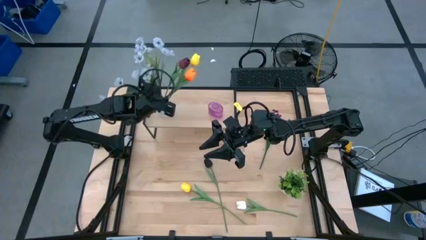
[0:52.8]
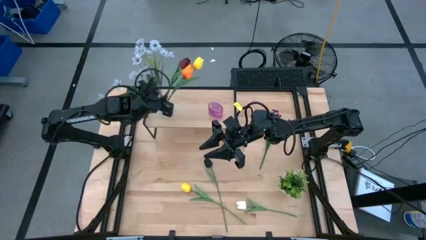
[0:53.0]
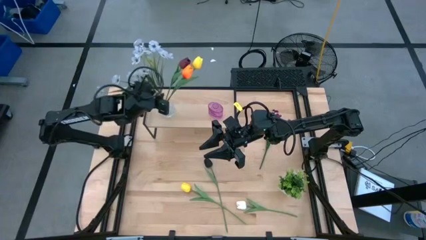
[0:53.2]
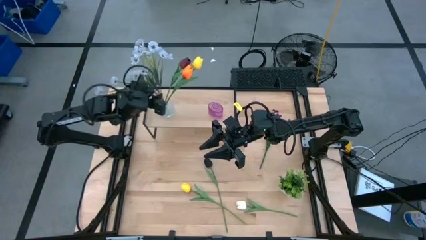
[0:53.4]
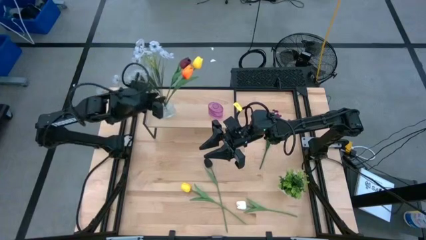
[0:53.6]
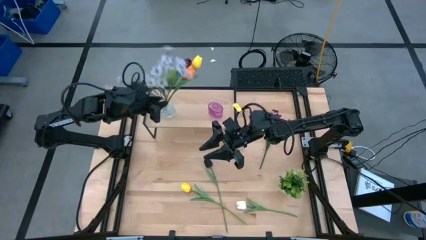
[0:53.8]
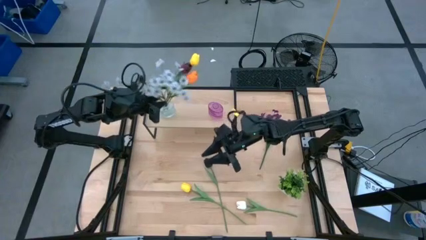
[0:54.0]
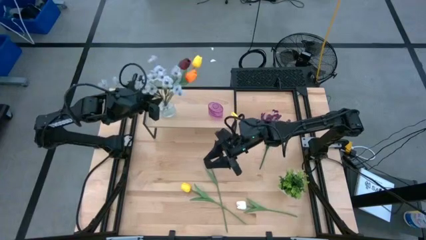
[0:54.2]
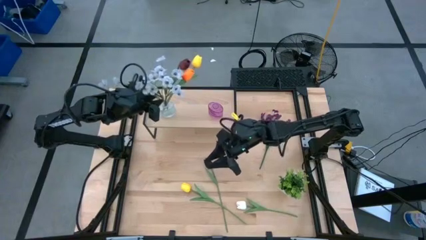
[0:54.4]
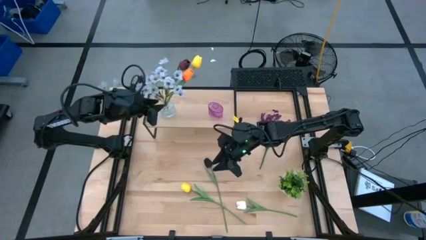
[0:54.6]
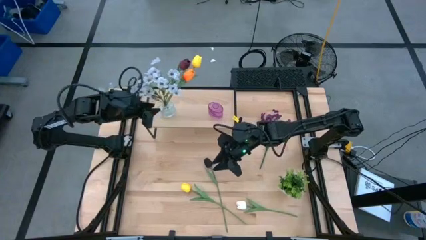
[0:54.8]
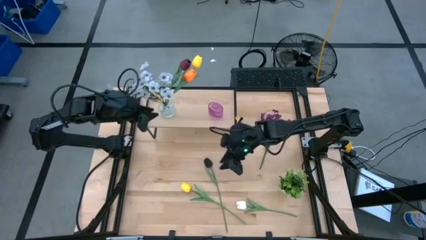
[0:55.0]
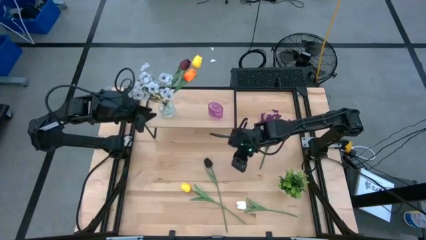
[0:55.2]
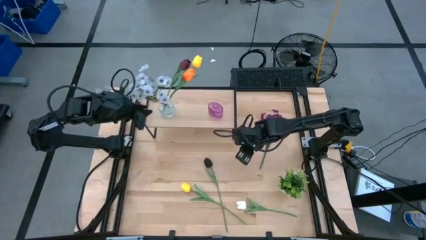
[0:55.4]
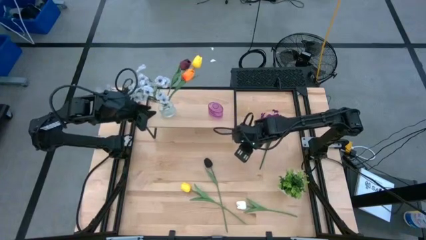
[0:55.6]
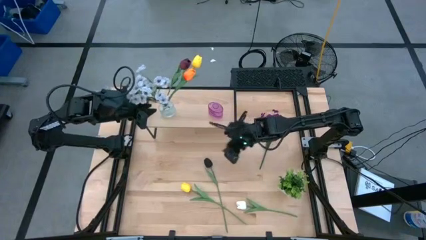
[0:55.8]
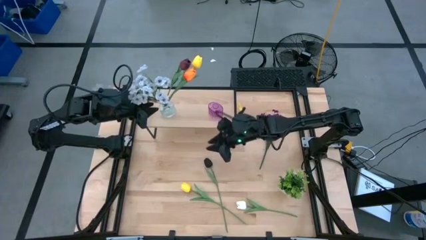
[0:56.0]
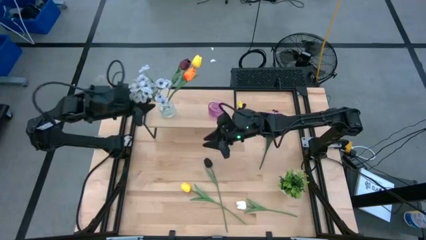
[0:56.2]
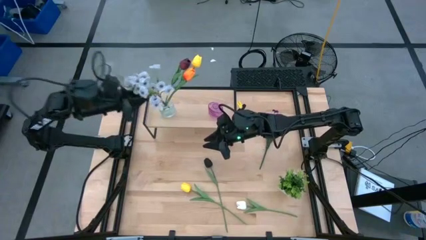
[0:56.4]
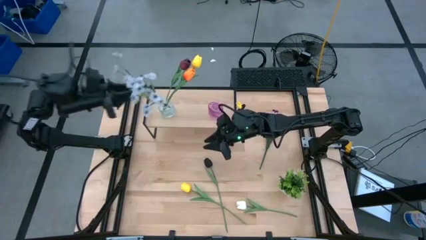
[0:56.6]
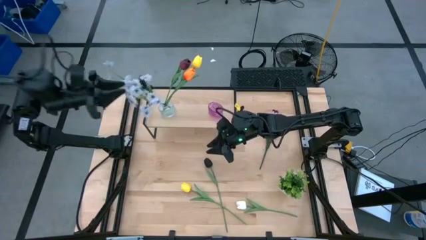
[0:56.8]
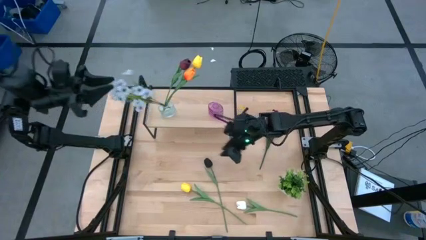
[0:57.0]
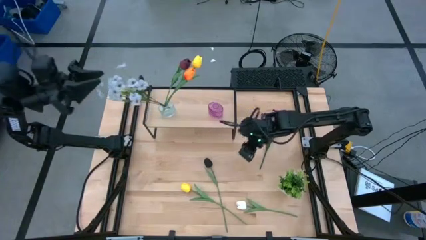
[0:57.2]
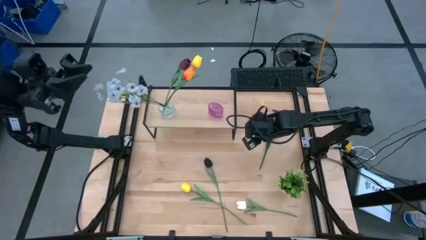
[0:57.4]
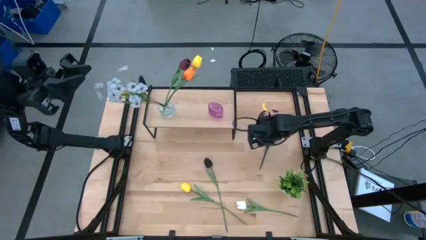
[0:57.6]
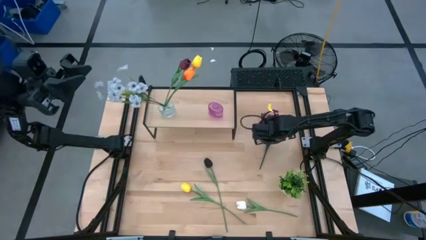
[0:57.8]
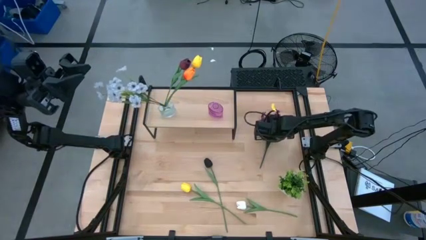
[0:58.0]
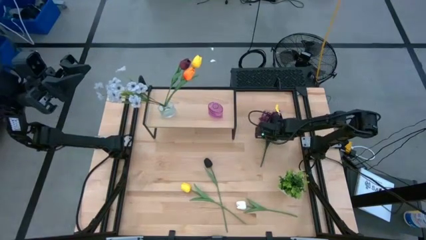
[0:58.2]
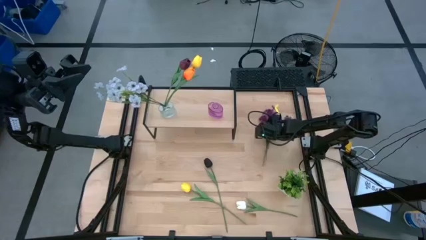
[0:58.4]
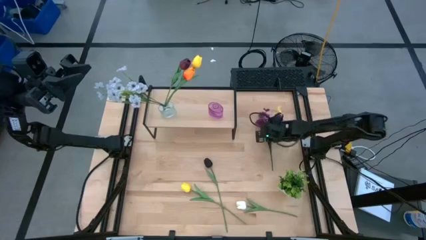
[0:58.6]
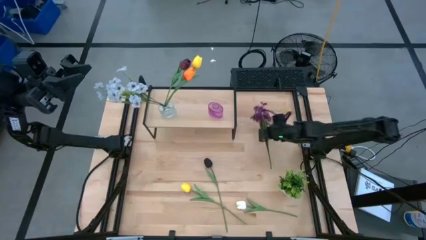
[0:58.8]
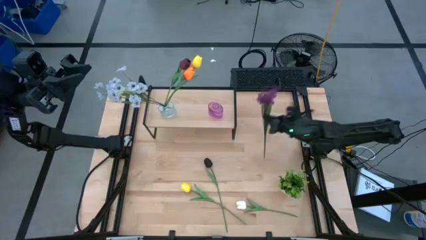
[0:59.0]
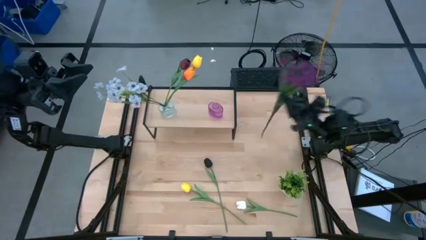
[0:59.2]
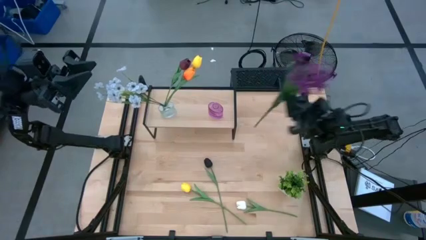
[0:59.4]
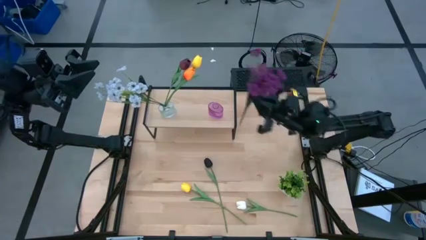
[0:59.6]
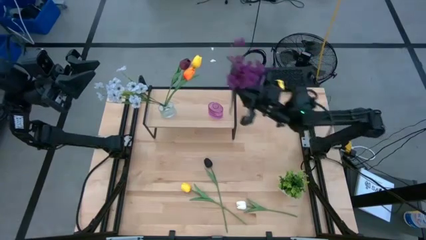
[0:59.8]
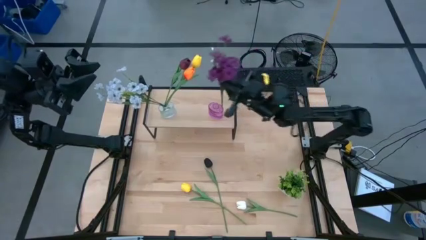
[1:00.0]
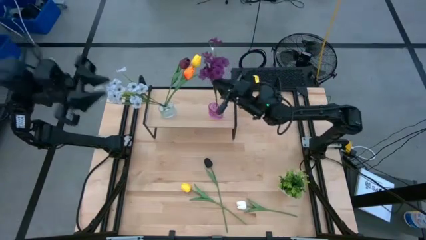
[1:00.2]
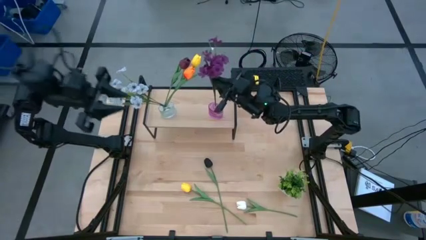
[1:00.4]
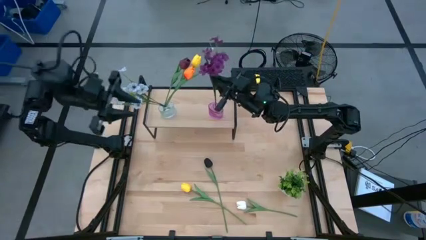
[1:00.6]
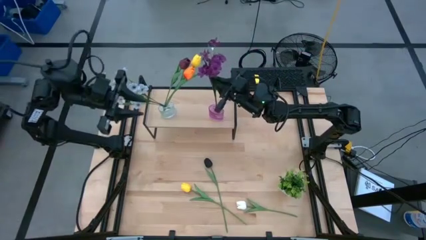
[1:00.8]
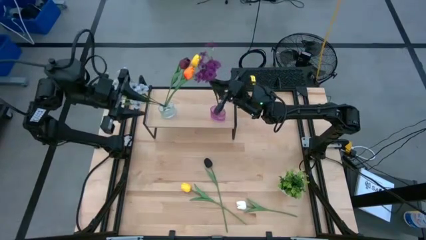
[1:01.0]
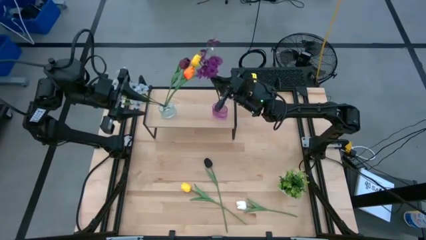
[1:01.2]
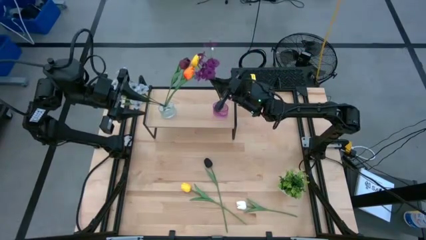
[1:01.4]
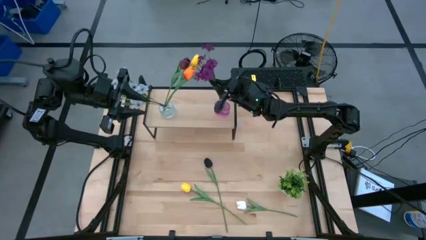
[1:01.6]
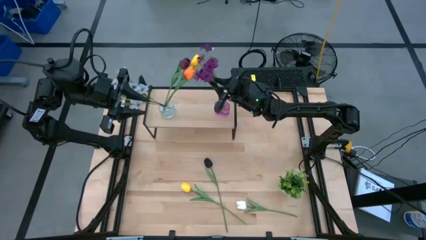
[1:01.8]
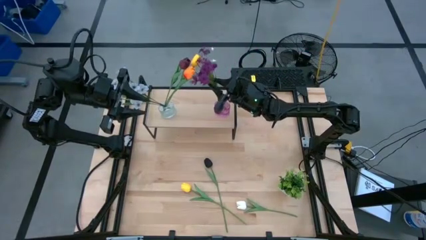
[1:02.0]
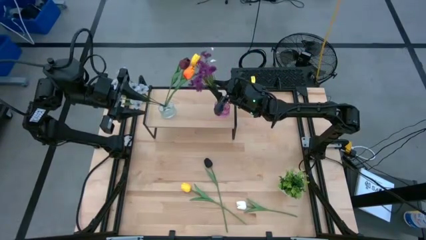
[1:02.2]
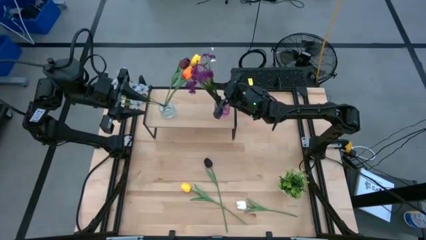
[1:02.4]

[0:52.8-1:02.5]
Task: Pick and place flowers into a vace then onto a shelf
Put the violet flowers into the violet vase on the shelf

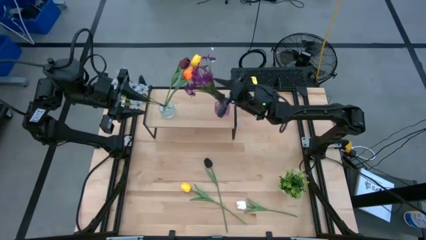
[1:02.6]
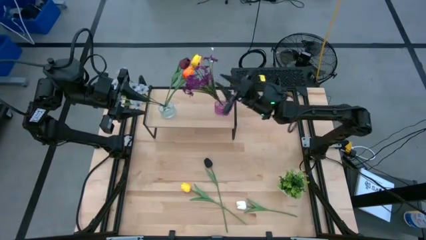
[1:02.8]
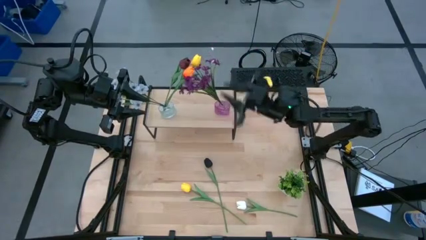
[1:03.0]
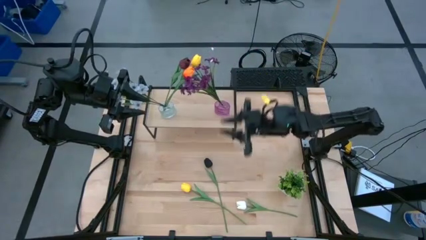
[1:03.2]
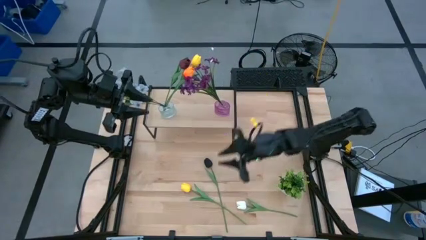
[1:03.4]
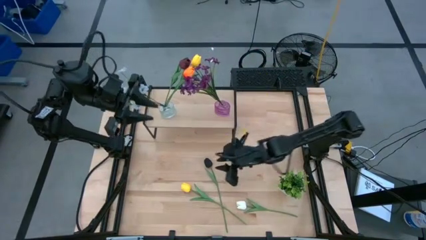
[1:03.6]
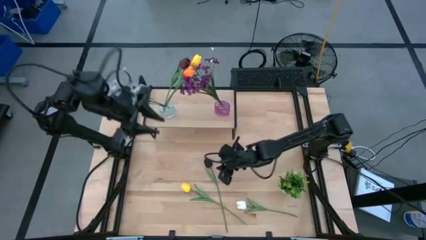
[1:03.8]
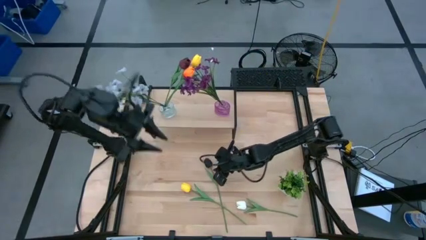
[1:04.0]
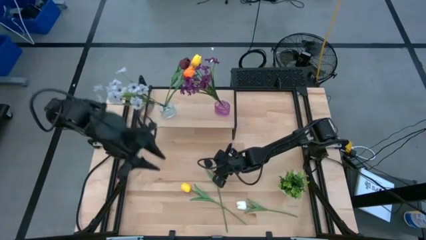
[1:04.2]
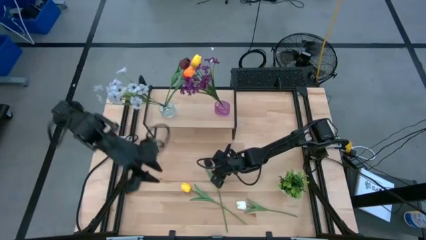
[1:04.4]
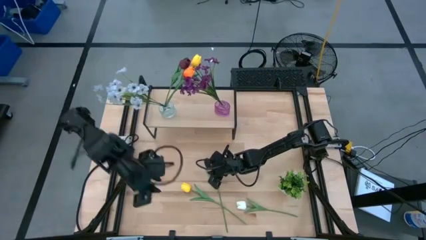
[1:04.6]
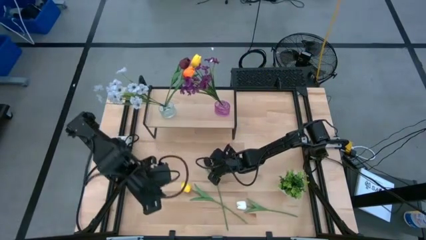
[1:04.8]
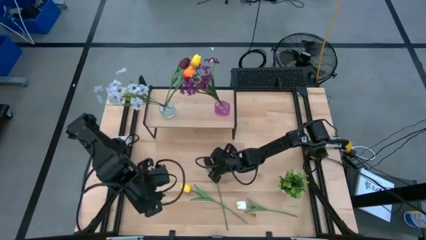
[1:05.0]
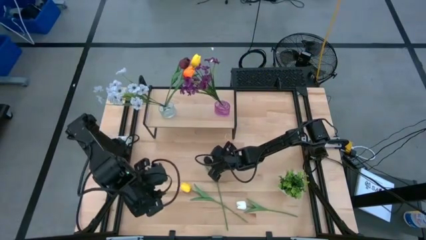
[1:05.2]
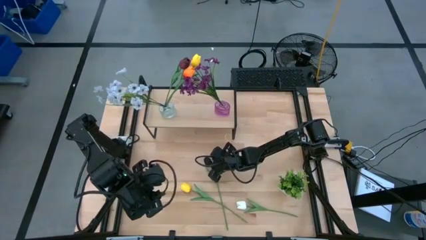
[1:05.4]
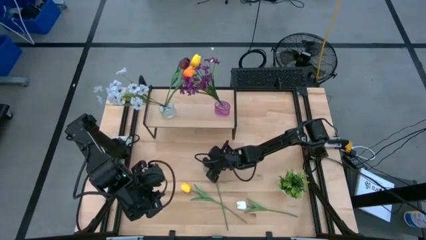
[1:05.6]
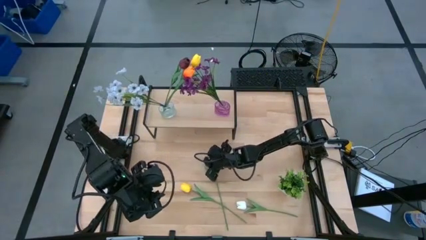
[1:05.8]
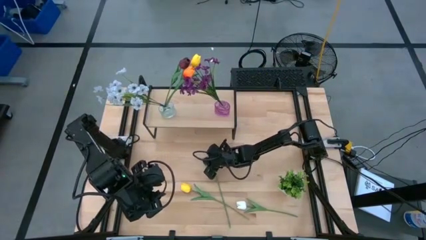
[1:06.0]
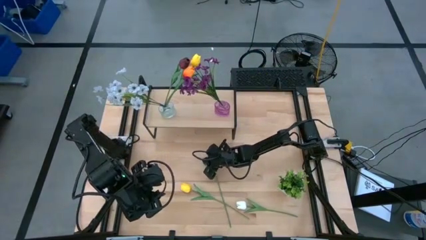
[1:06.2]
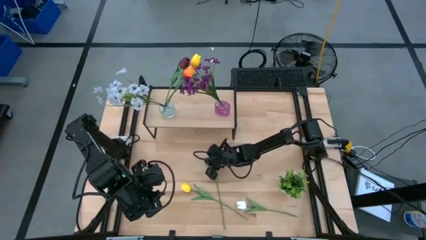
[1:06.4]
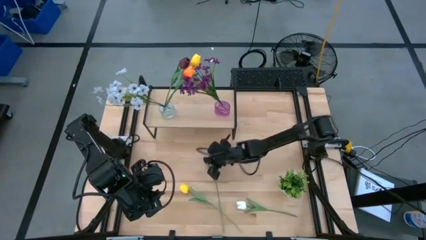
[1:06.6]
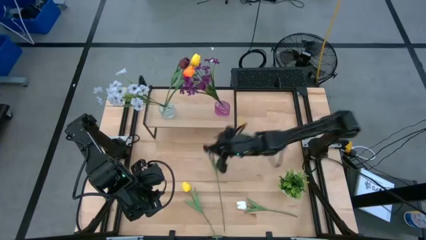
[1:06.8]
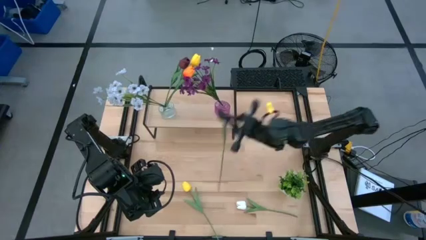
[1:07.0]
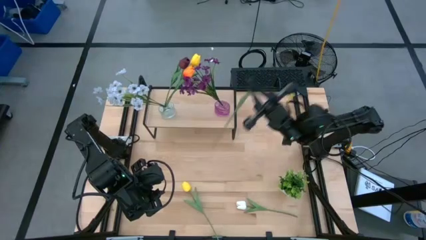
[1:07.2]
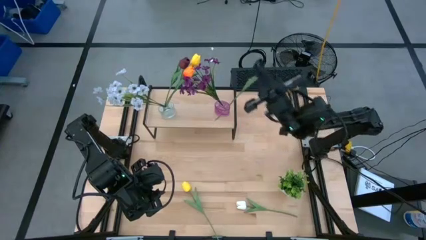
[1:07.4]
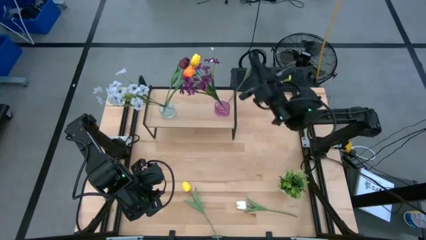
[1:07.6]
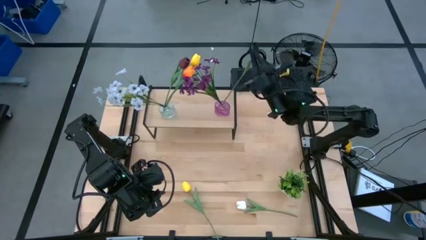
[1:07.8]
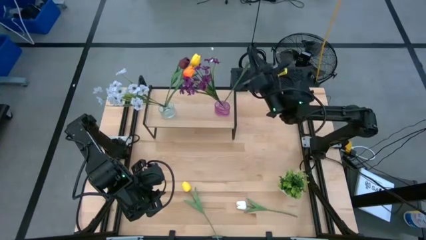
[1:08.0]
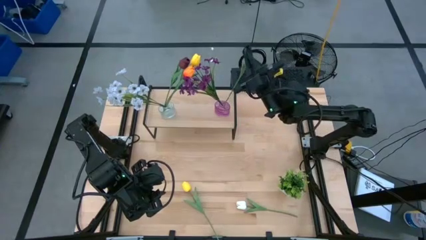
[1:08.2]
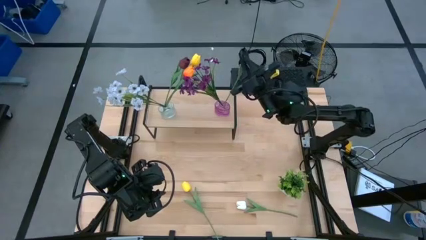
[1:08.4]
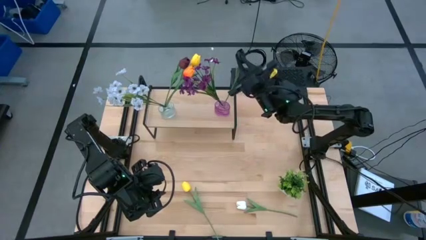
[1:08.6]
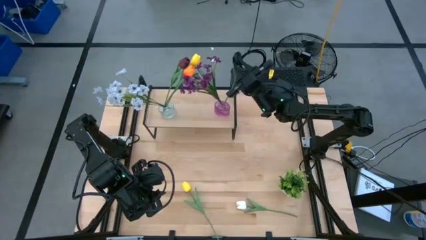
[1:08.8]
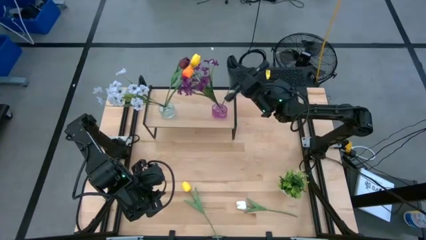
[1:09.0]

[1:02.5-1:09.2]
Put the black flower into the violet vase on the shelf
